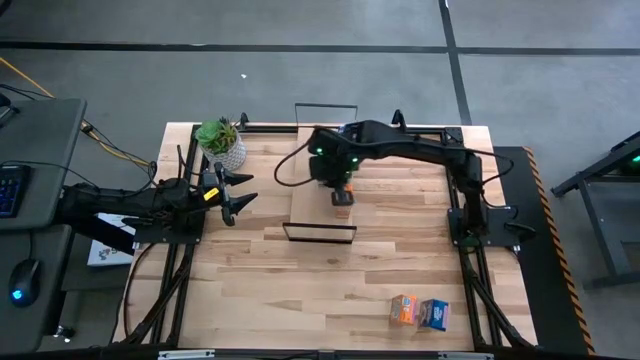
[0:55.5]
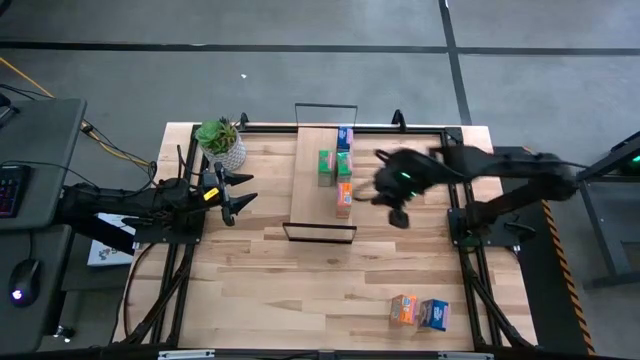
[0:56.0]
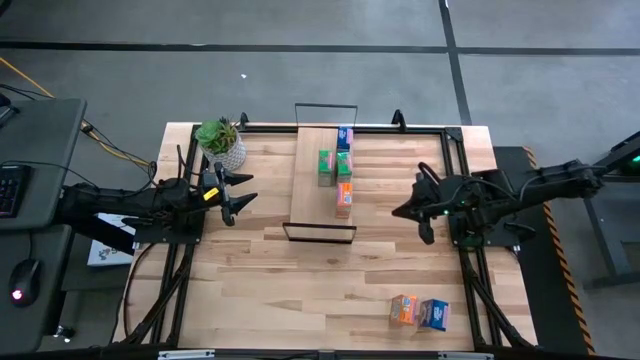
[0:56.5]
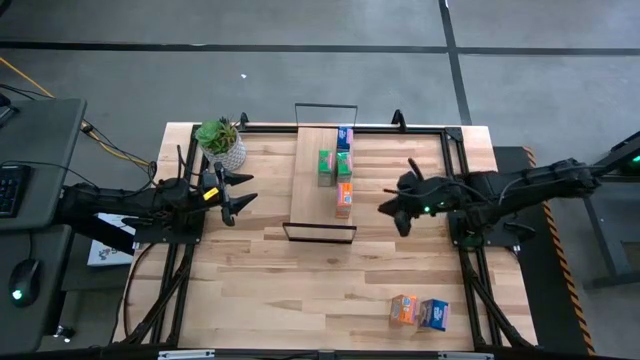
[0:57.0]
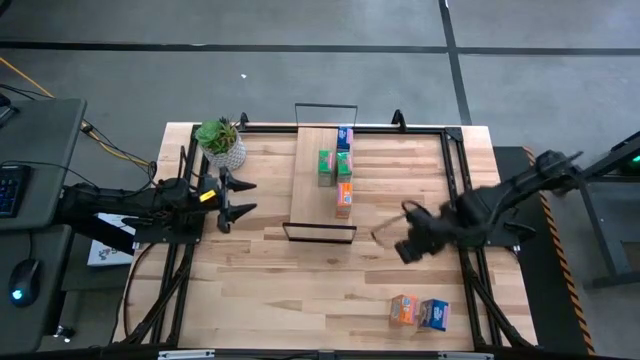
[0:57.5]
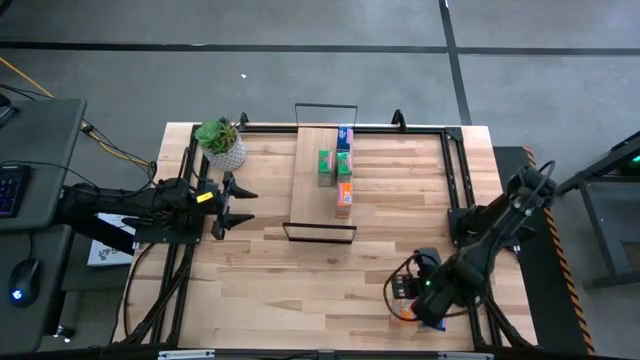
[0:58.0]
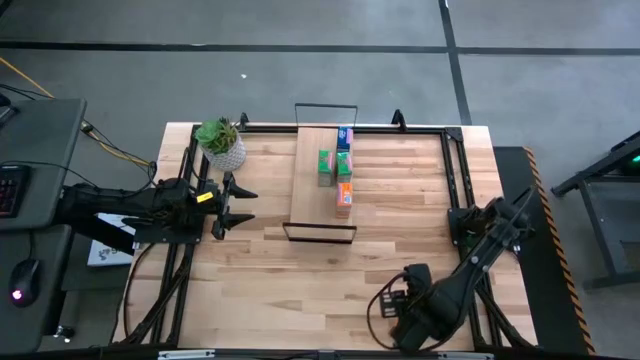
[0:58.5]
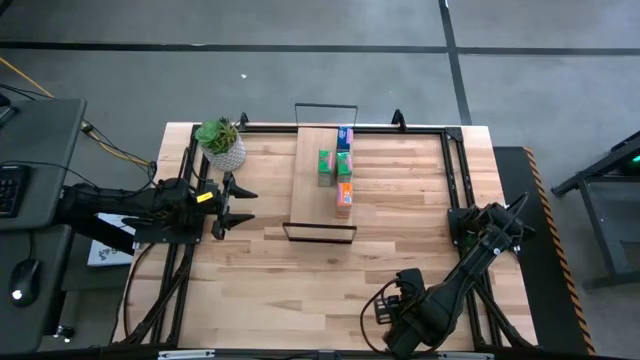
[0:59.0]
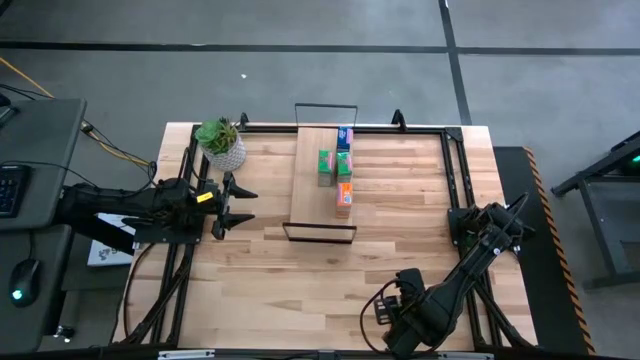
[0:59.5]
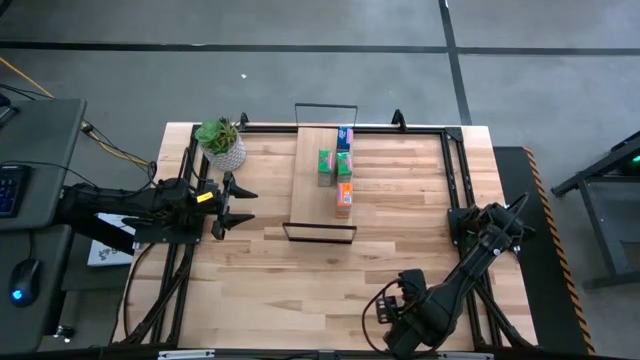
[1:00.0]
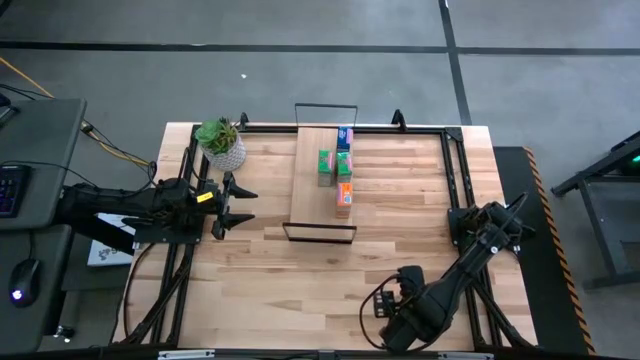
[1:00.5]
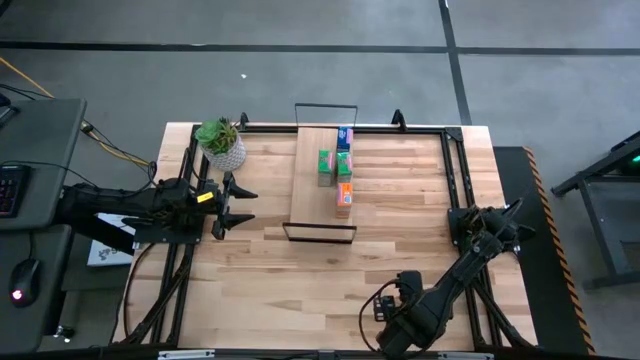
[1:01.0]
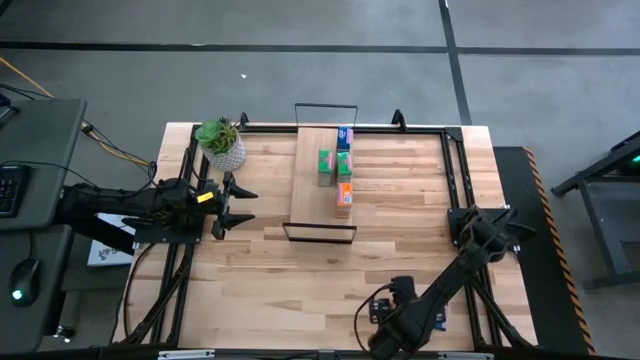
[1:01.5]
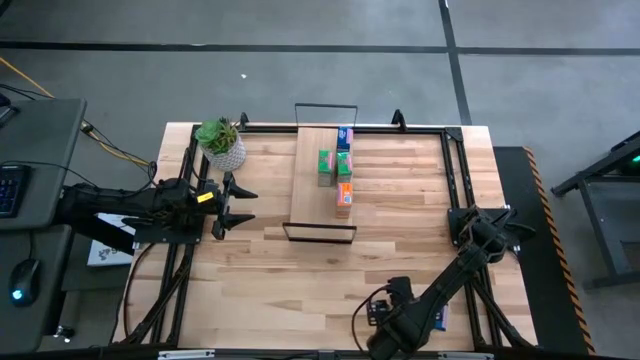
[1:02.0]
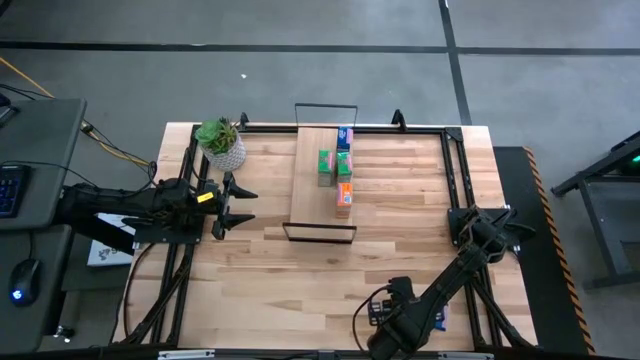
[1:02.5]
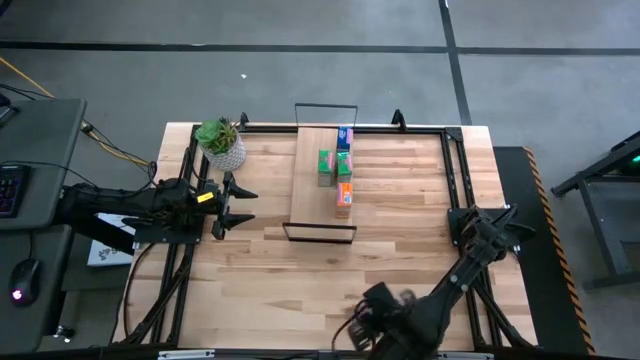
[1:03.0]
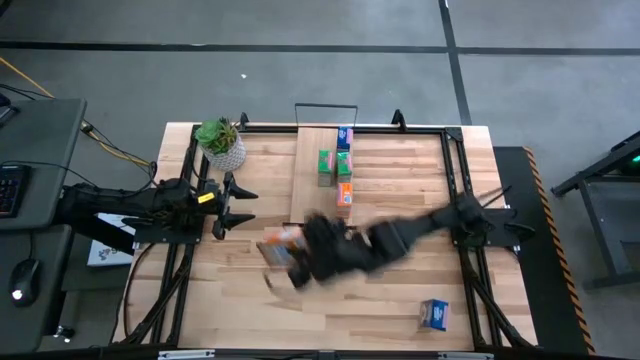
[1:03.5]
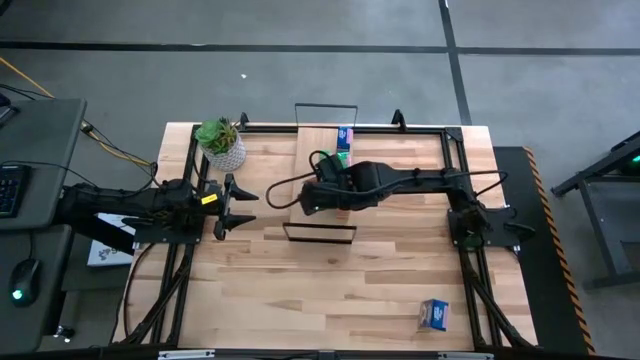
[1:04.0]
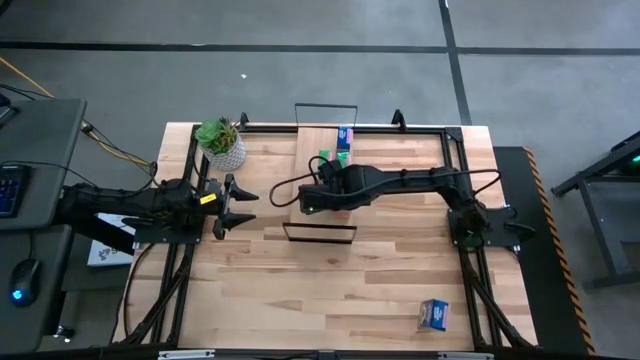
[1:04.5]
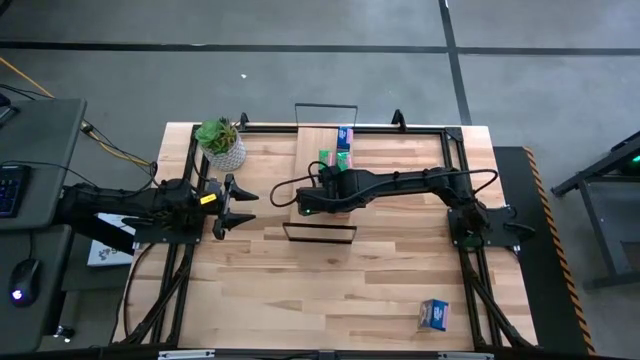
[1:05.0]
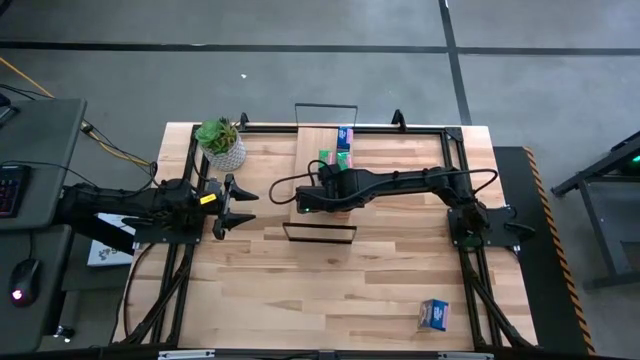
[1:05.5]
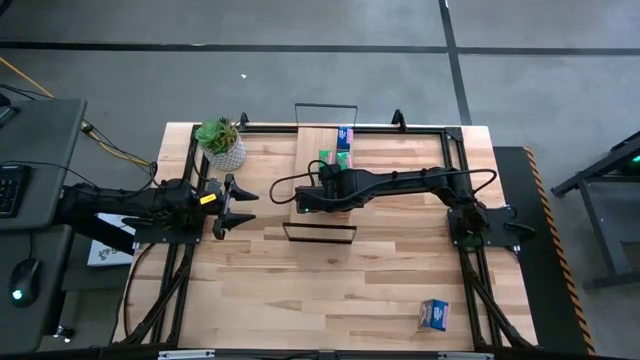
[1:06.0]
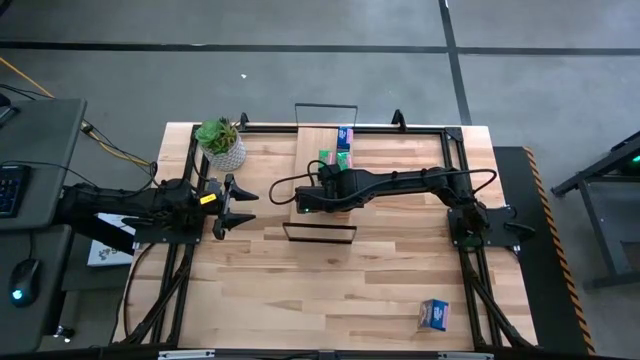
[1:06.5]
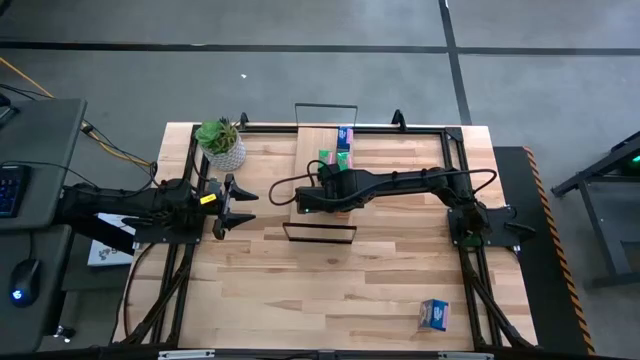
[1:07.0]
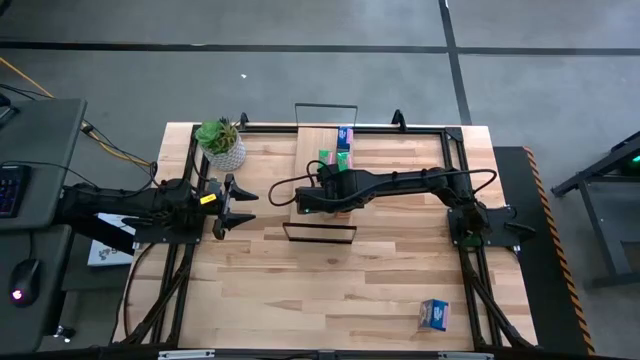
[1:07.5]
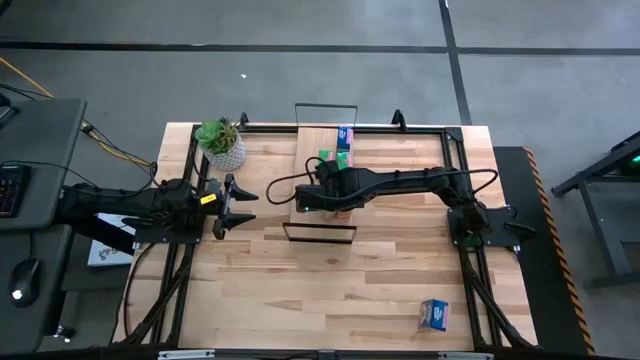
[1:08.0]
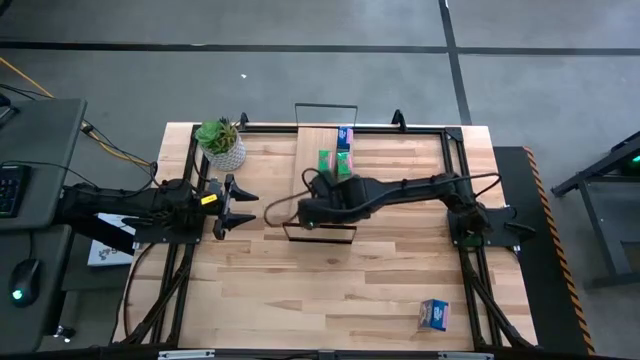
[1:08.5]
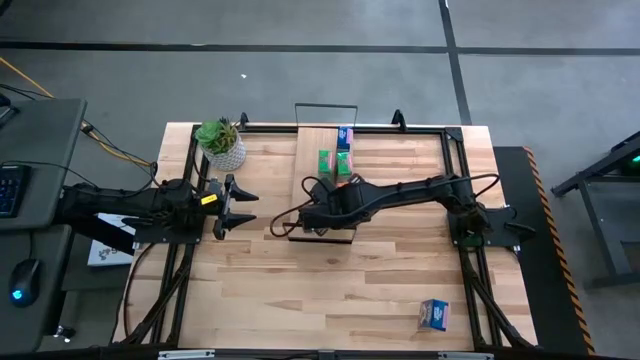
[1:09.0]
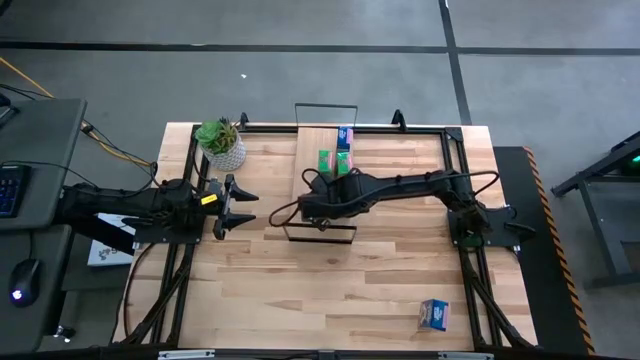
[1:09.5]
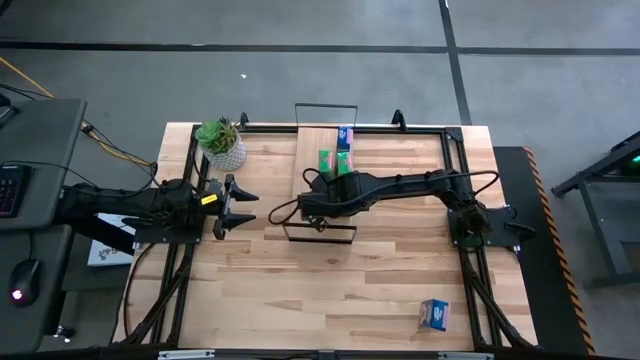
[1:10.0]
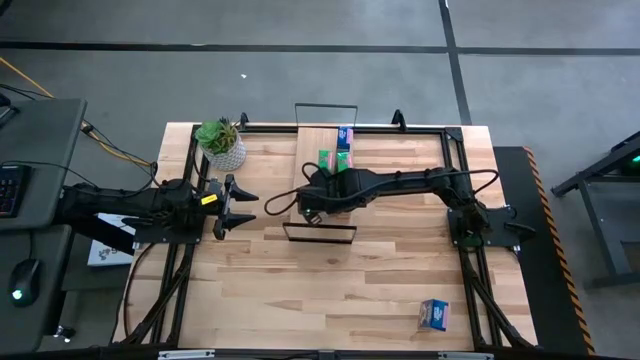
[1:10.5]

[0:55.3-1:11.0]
Task: Stack cereal on shelf
Put the orange cereal box aligned with the other orange cereal box on the shelf

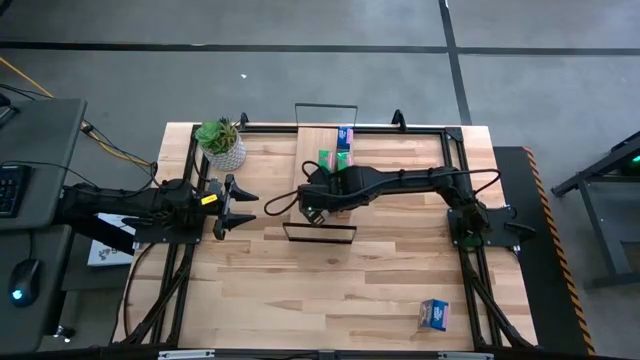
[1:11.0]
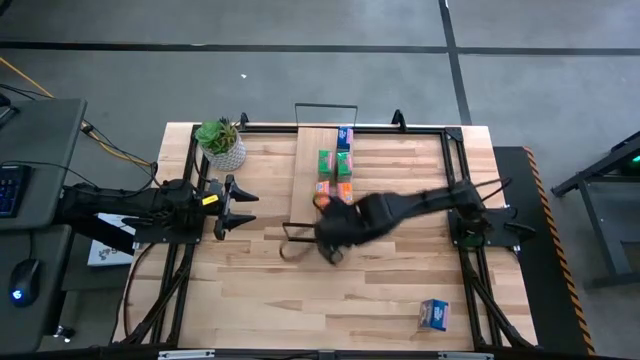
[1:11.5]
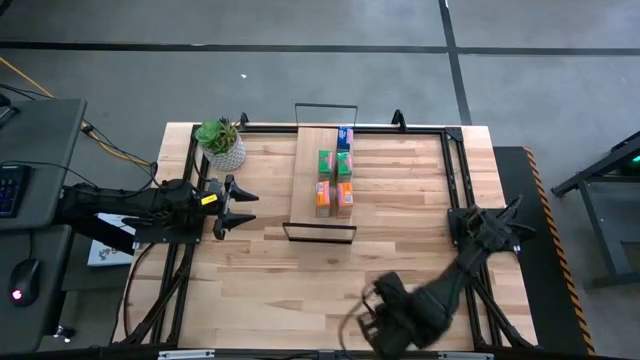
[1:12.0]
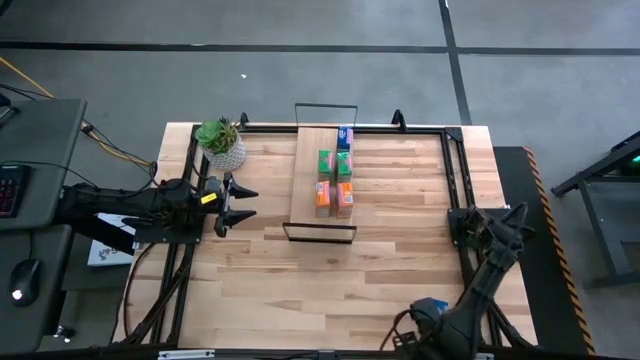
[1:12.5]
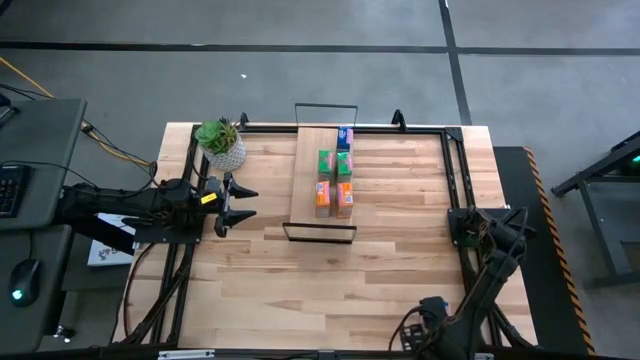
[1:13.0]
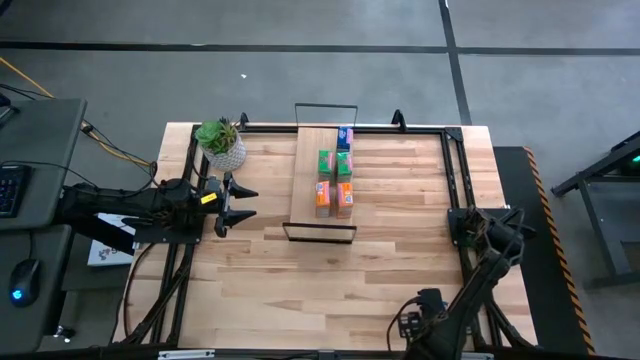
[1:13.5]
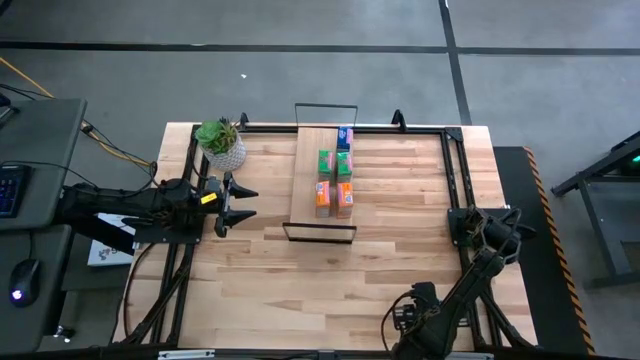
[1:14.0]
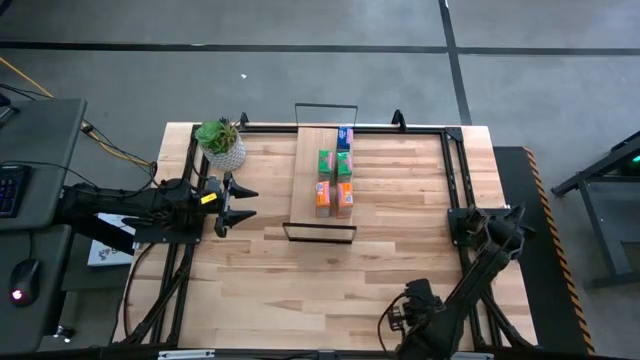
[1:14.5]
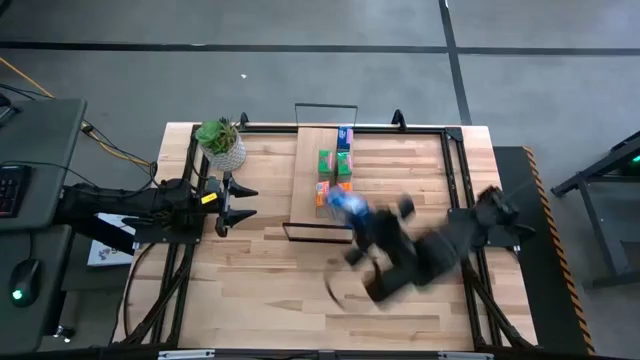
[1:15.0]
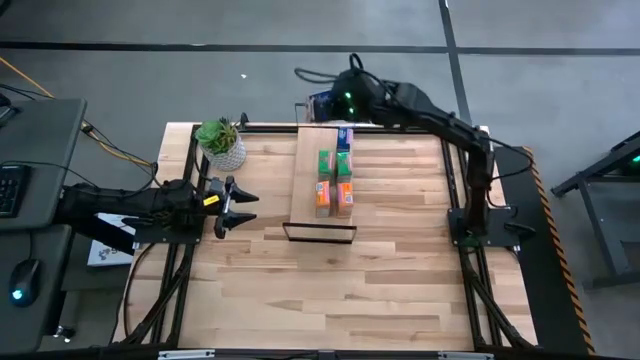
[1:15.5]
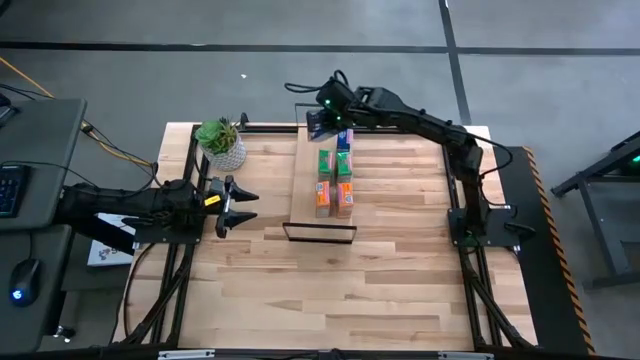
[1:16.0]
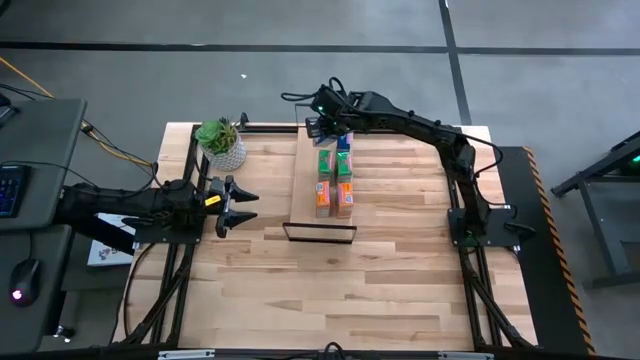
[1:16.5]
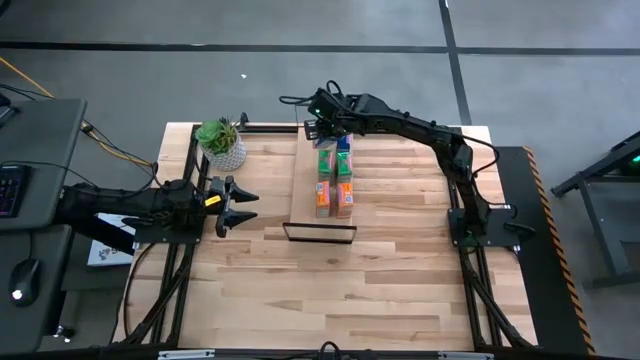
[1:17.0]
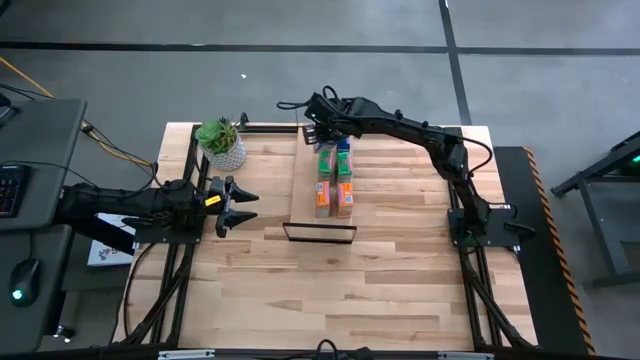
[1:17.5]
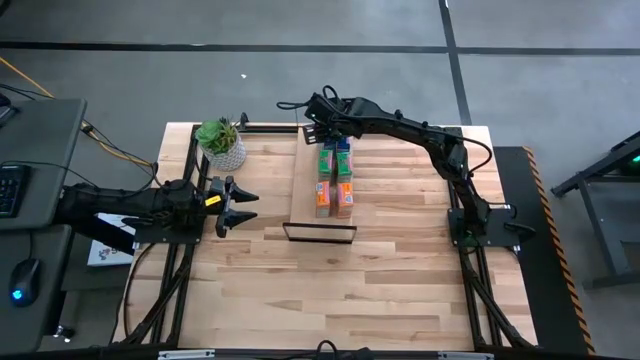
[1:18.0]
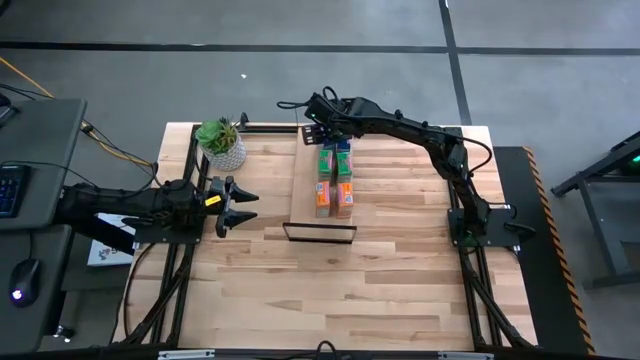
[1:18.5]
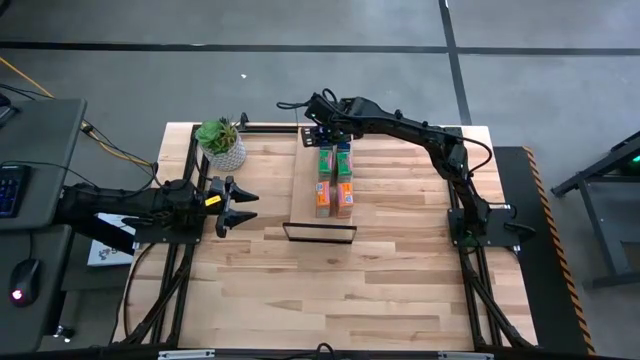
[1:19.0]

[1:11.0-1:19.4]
Put the blue cereal box aligned with the other blue cereal box on the shelf
